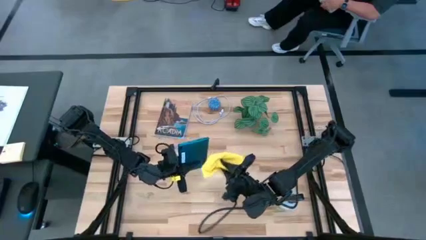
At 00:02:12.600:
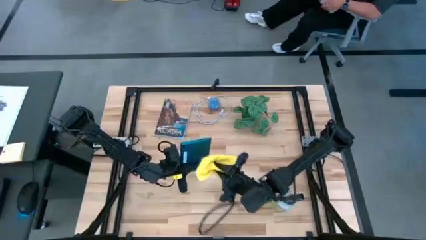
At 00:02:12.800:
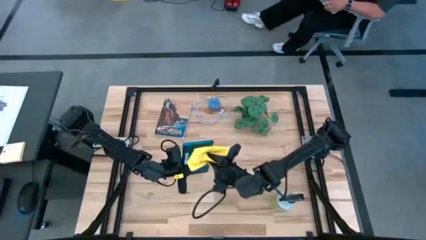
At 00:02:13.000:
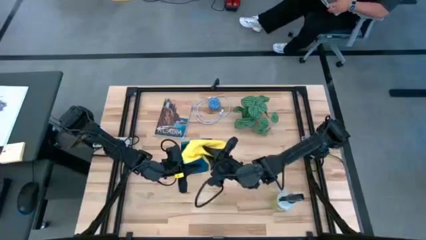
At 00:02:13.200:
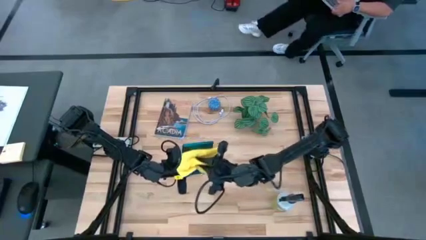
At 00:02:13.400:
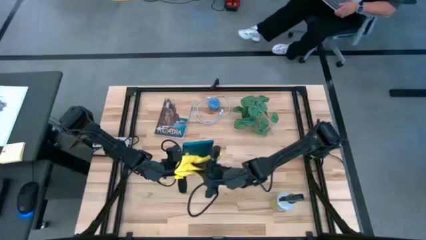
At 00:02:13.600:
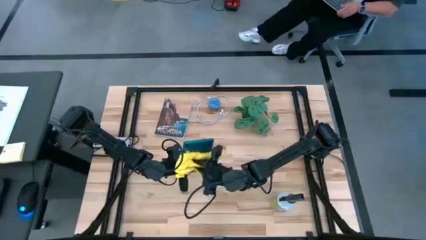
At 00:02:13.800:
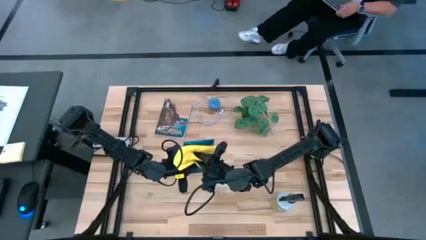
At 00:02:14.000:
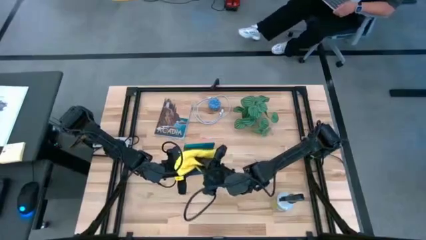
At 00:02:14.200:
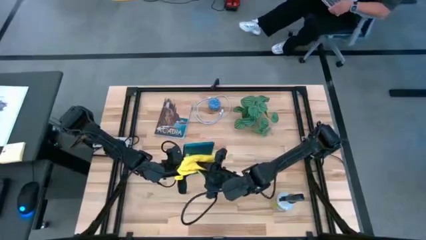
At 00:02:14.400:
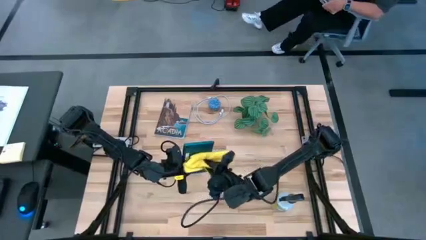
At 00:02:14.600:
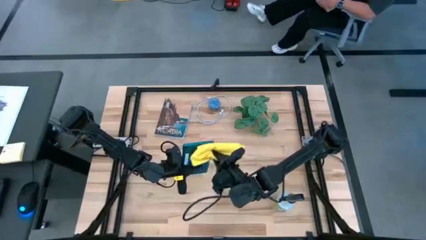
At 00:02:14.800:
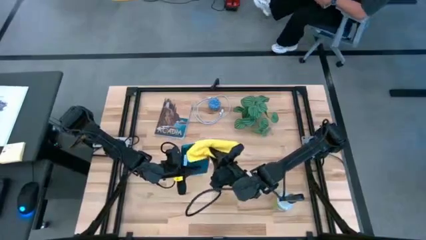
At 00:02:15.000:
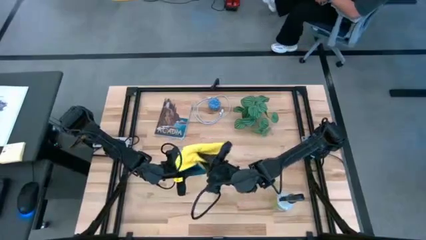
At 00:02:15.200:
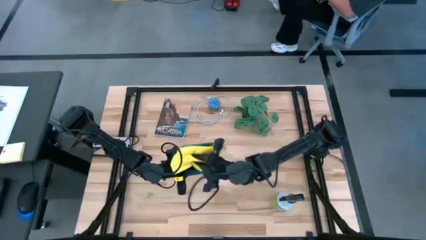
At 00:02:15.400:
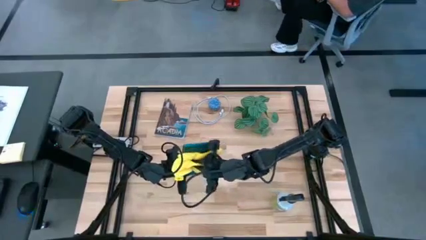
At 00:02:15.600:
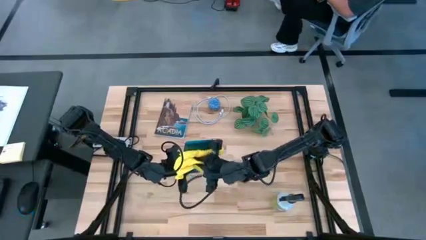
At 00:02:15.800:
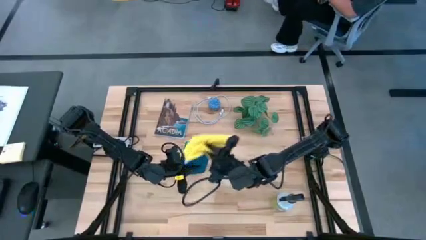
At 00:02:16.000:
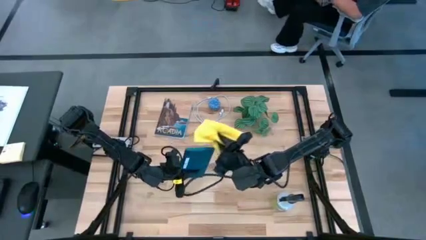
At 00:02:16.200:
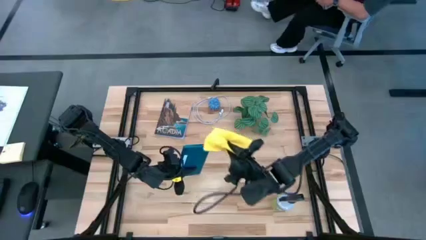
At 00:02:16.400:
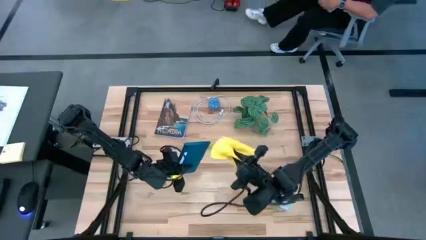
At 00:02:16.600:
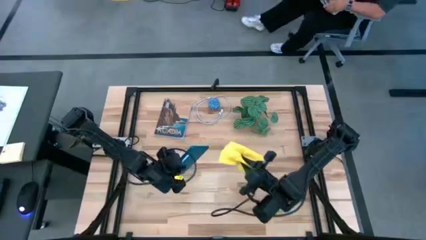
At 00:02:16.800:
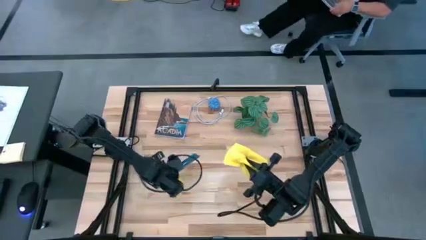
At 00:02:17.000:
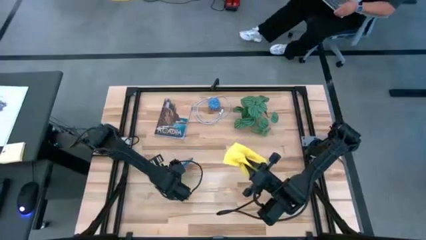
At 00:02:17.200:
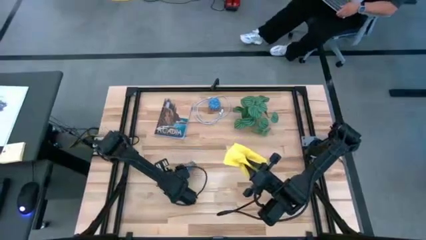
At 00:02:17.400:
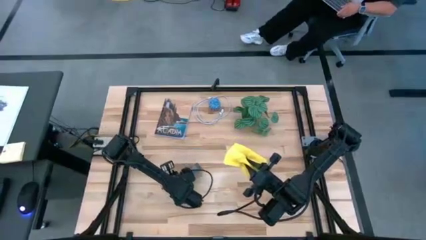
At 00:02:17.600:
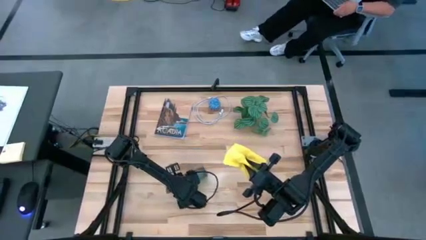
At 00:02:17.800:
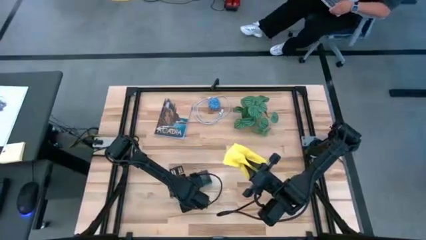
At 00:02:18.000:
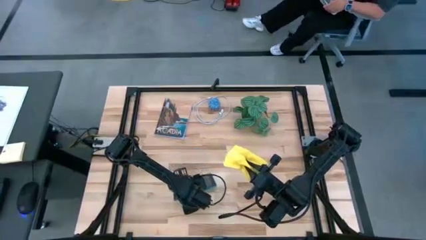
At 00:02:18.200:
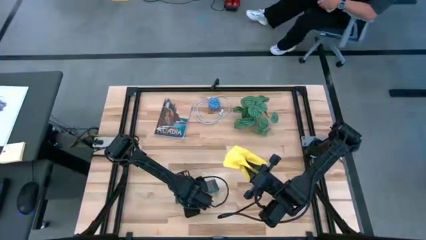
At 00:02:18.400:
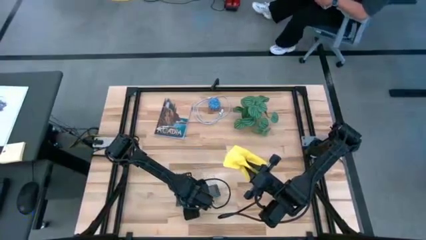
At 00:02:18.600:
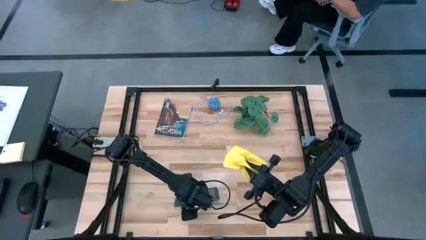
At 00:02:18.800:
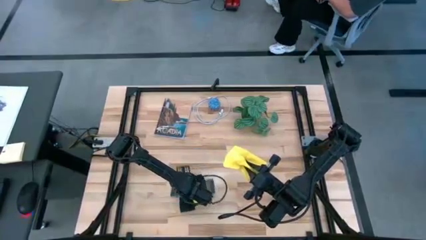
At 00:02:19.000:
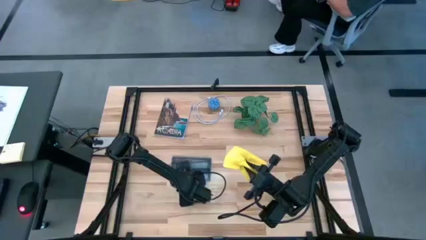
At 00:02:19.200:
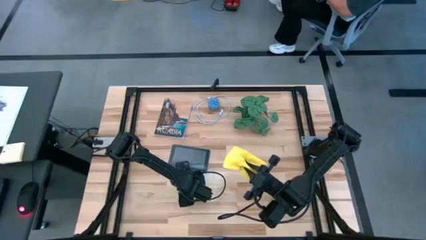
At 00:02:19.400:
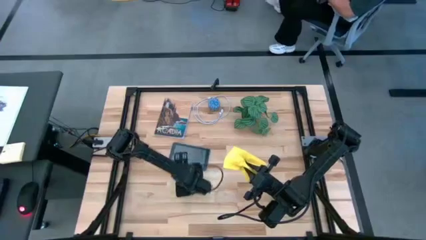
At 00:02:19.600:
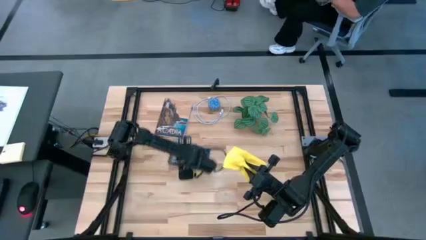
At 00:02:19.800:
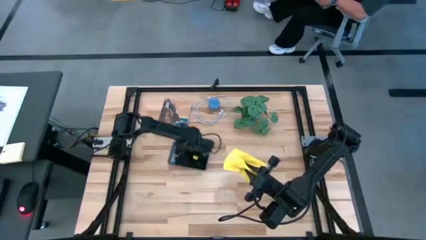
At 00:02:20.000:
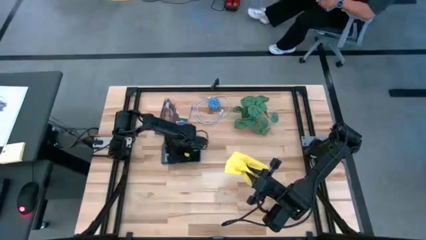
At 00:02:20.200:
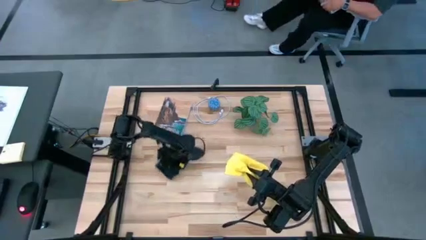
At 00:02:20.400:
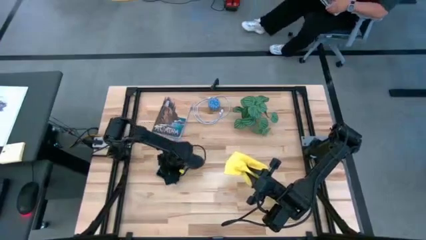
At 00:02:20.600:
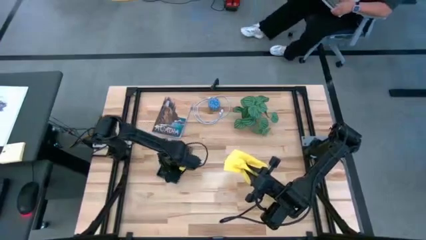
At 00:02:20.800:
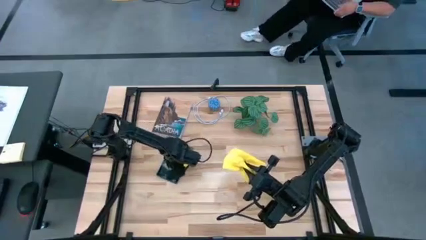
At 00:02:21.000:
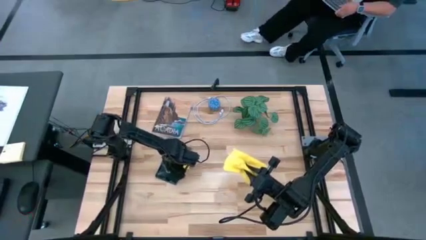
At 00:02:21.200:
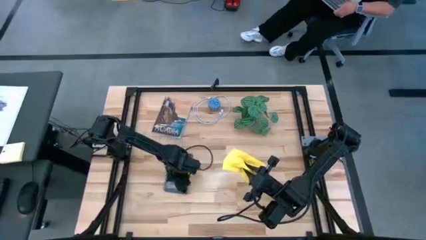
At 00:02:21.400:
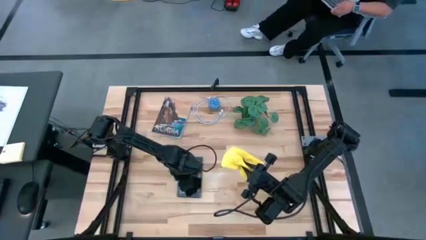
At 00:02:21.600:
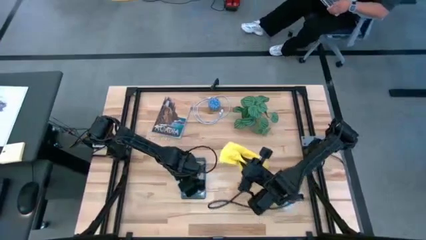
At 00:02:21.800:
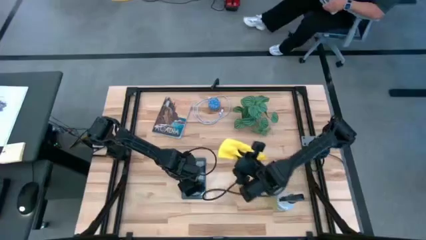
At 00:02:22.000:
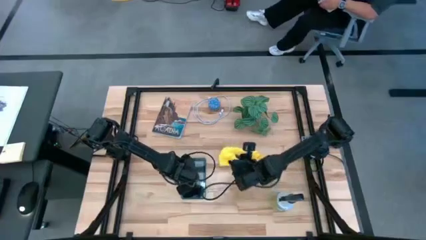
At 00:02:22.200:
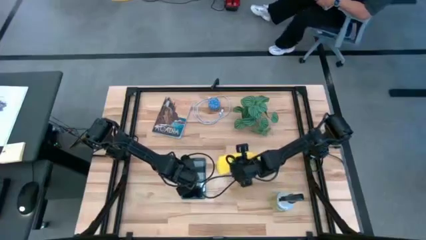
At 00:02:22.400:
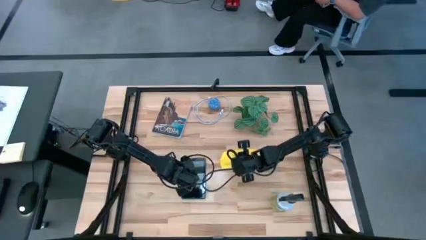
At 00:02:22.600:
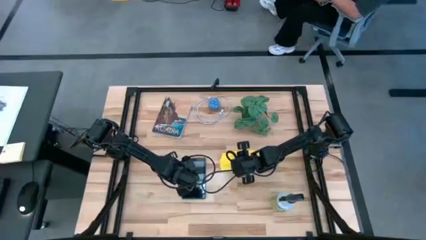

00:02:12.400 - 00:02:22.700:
Task: Clean tablet
Wipe the back of the tablet using microfiber towel

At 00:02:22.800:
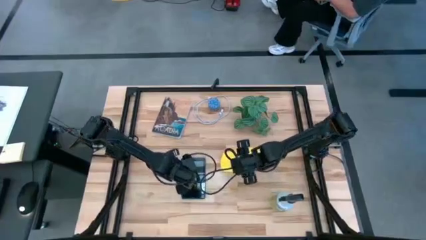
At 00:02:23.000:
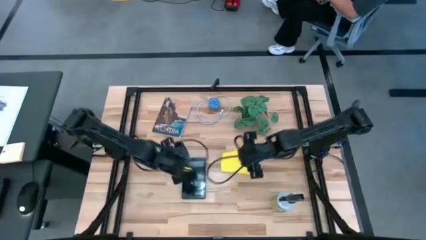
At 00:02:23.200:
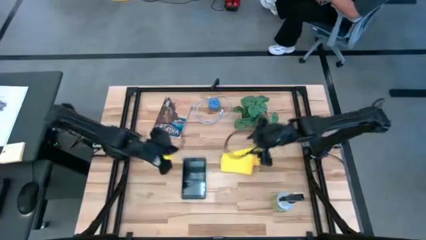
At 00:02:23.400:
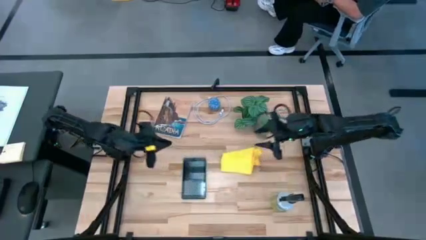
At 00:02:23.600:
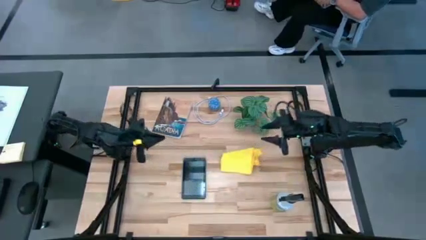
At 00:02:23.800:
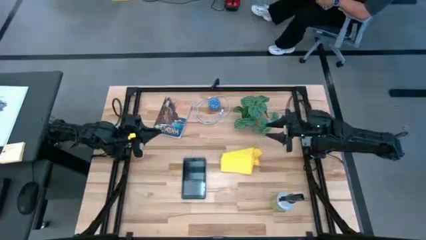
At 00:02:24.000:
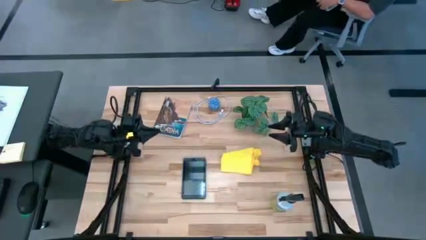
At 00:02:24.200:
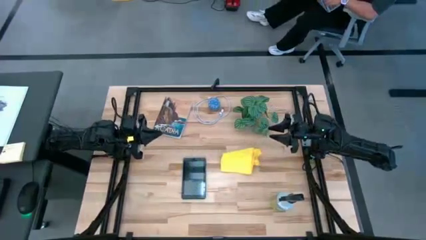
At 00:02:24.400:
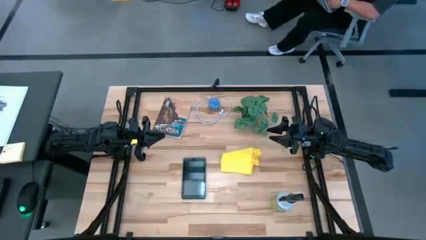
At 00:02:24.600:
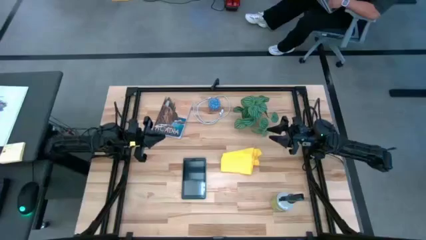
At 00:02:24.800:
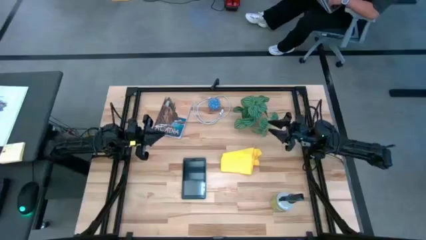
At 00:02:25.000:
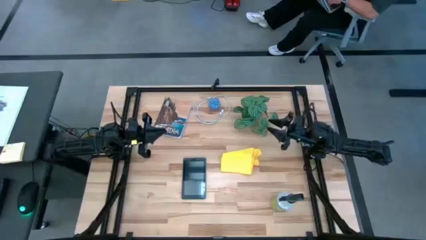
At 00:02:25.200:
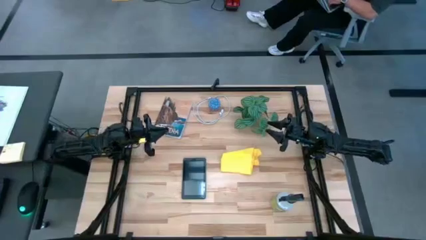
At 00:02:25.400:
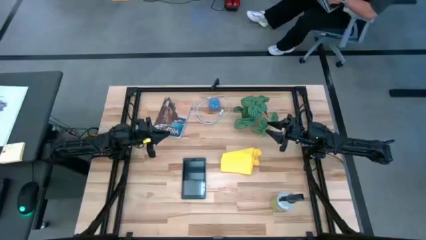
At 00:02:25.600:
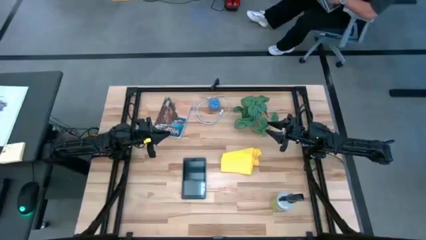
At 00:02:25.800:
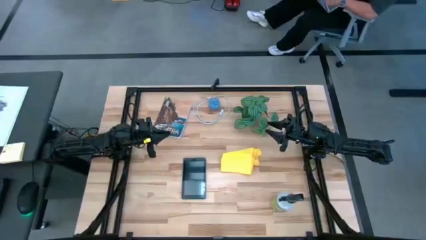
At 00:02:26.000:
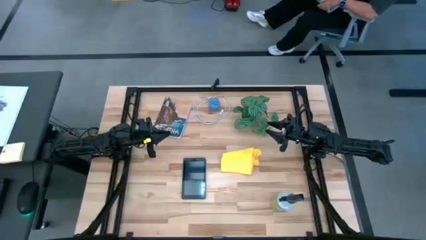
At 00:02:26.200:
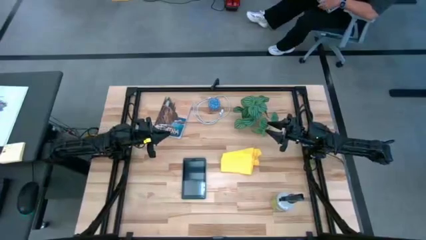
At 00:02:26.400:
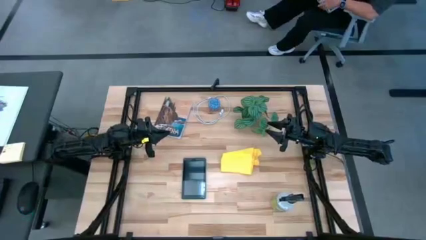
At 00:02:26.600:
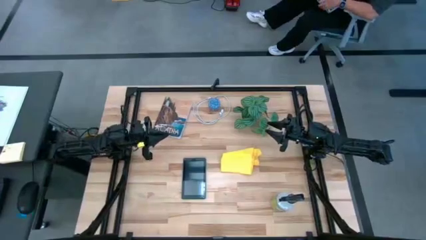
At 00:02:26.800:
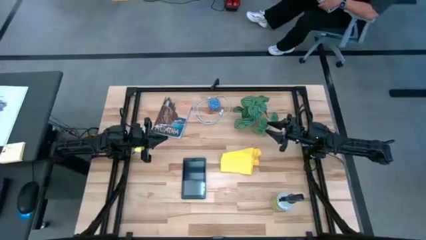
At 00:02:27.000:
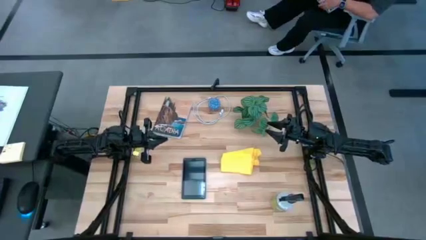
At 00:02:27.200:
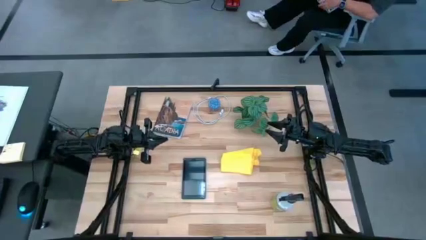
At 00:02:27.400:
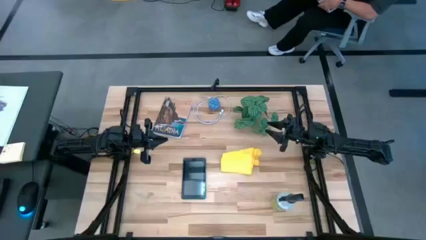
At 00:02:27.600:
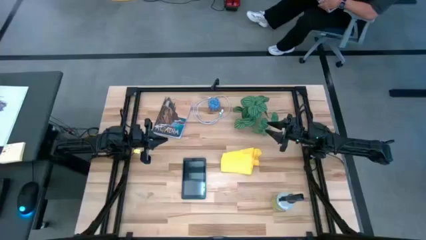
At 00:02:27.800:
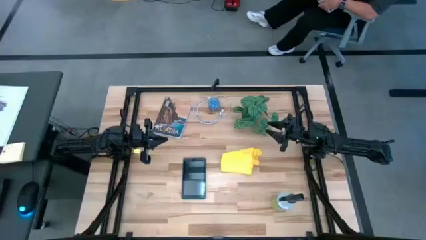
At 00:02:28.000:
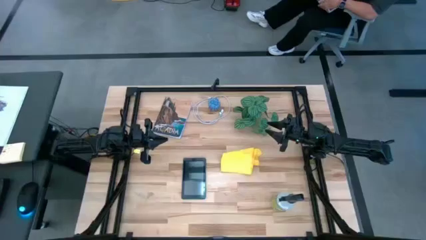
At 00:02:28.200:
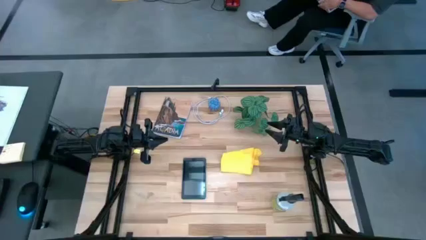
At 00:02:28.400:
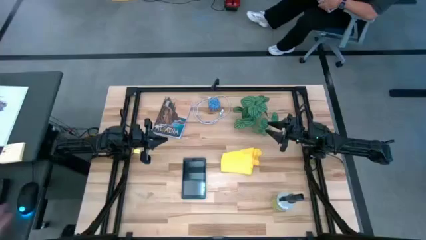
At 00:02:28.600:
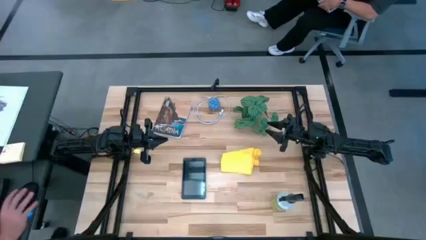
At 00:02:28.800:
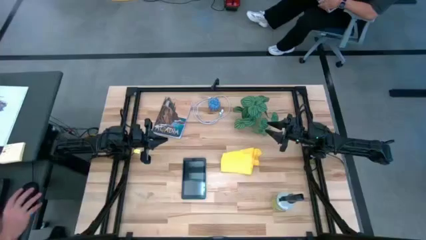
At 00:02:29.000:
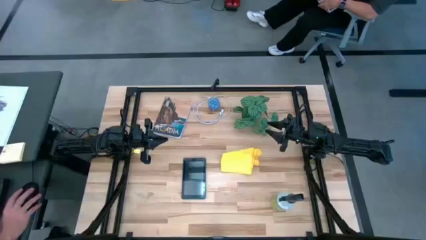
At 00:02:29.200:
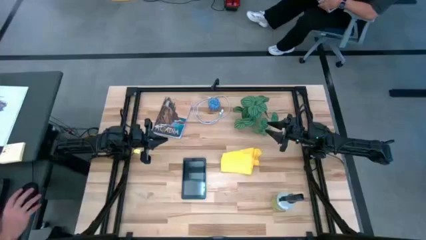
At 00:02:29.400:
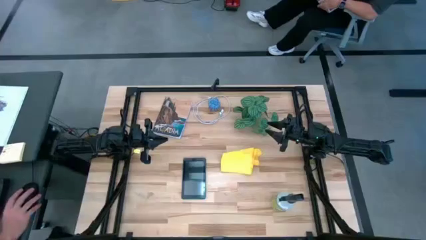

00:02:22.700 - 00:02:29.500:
Return to Home Position
